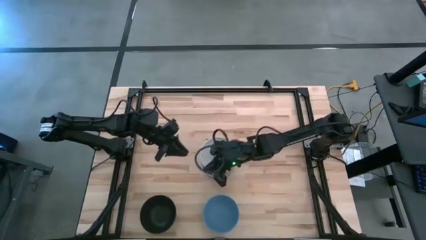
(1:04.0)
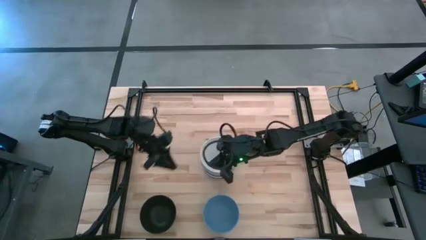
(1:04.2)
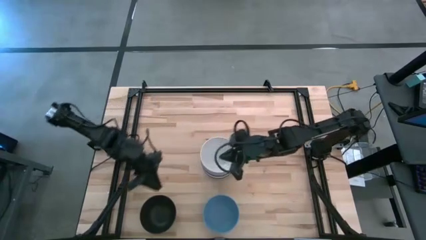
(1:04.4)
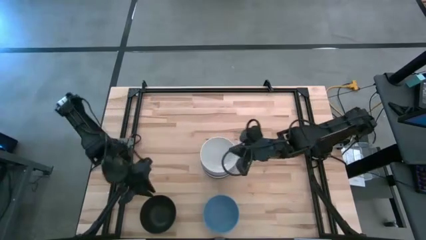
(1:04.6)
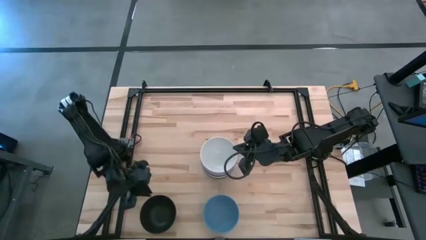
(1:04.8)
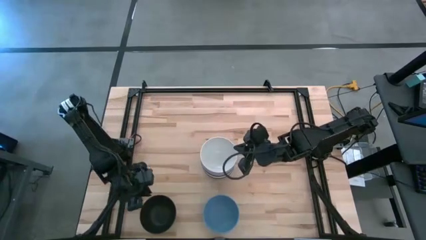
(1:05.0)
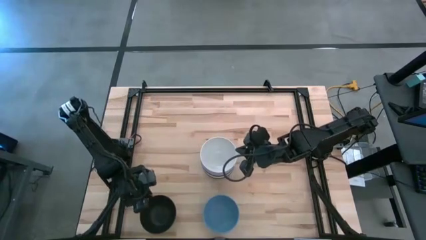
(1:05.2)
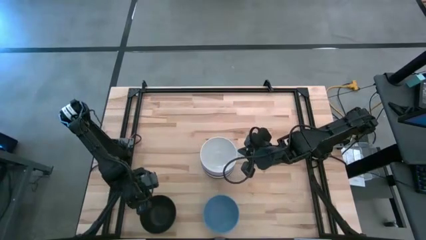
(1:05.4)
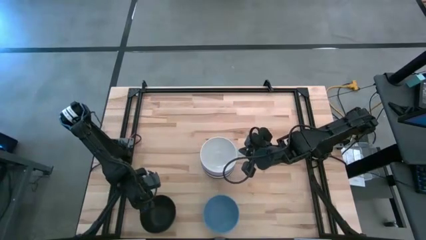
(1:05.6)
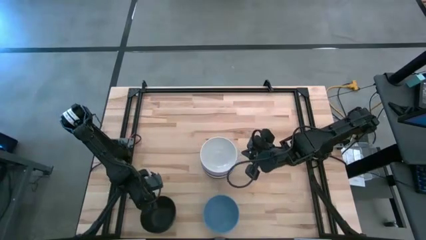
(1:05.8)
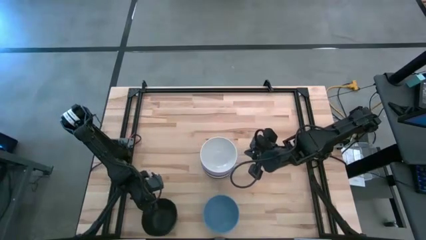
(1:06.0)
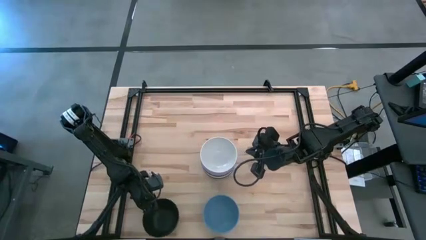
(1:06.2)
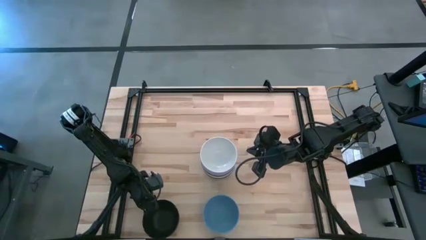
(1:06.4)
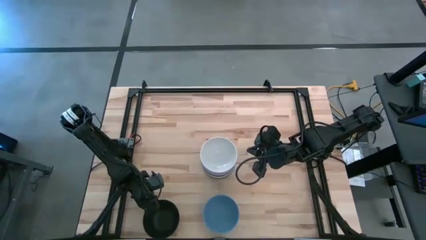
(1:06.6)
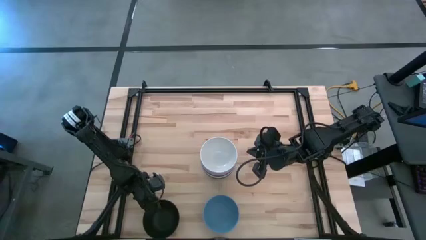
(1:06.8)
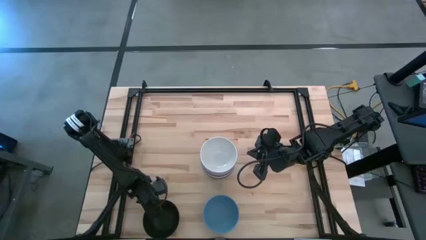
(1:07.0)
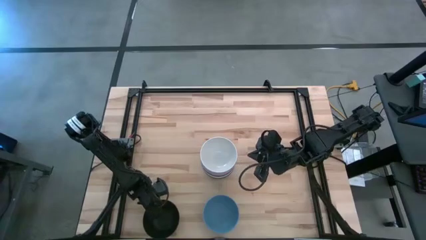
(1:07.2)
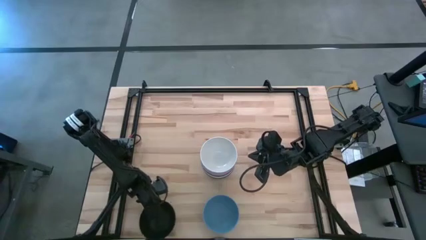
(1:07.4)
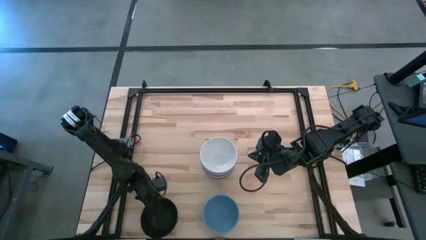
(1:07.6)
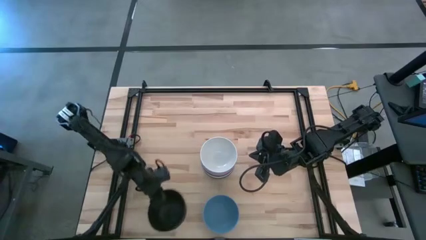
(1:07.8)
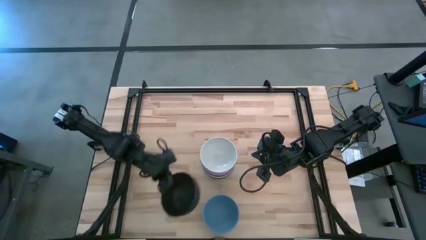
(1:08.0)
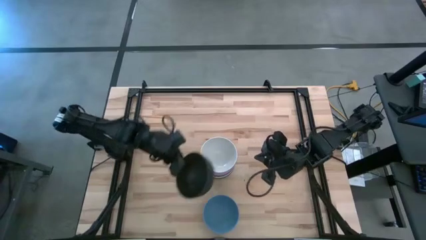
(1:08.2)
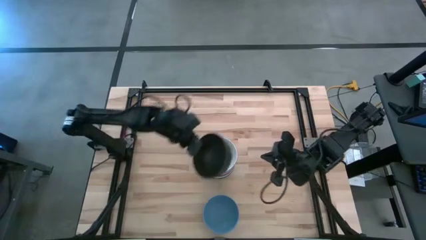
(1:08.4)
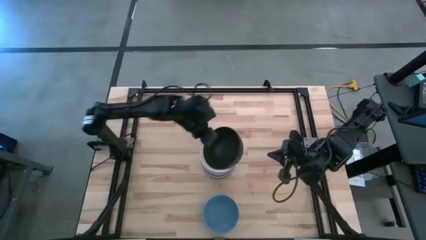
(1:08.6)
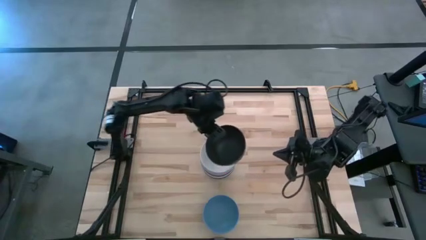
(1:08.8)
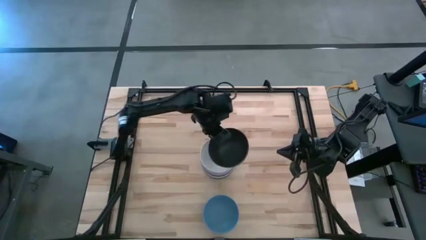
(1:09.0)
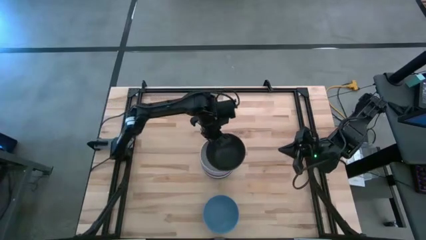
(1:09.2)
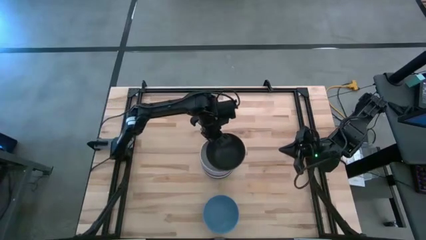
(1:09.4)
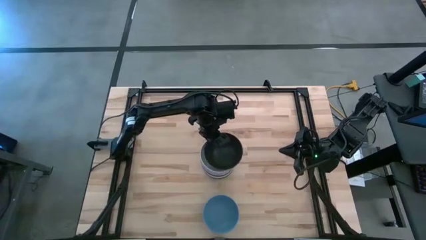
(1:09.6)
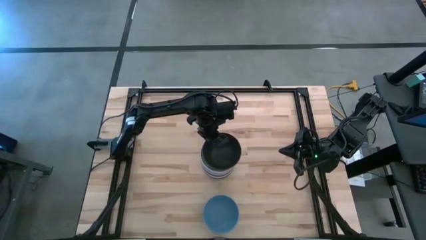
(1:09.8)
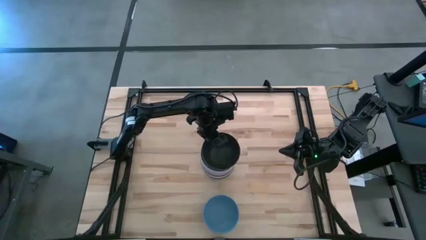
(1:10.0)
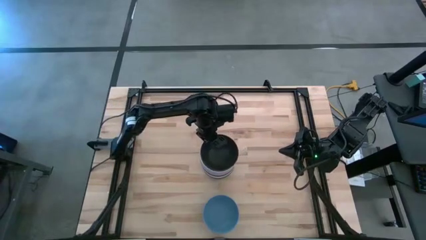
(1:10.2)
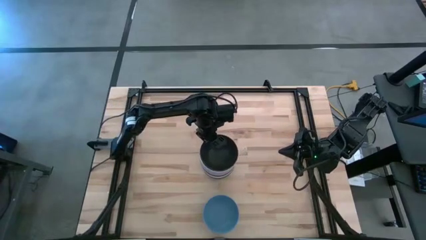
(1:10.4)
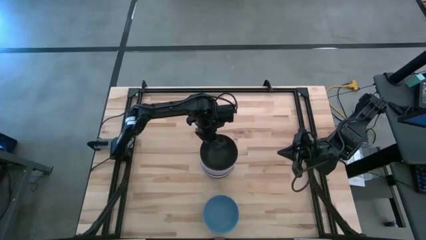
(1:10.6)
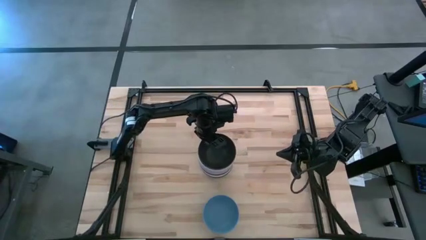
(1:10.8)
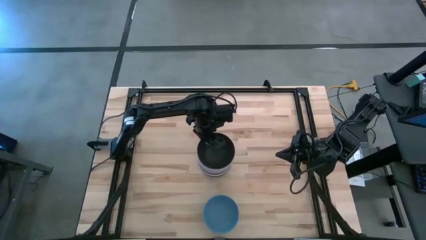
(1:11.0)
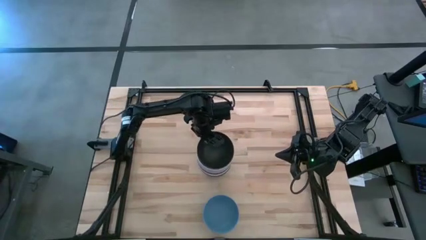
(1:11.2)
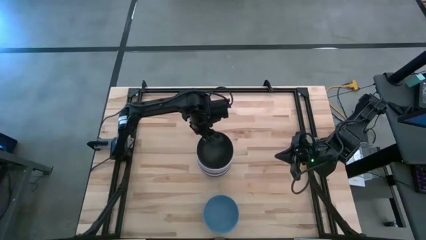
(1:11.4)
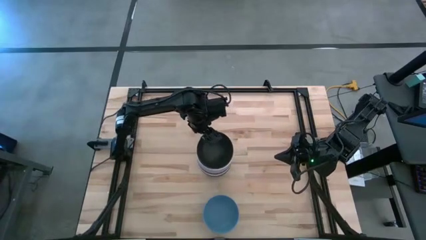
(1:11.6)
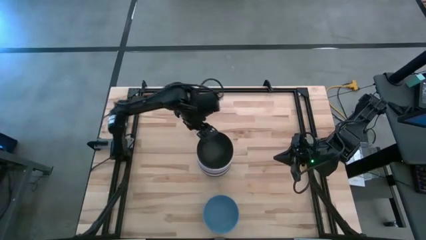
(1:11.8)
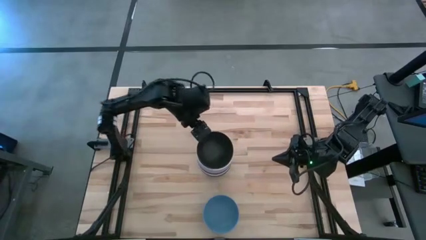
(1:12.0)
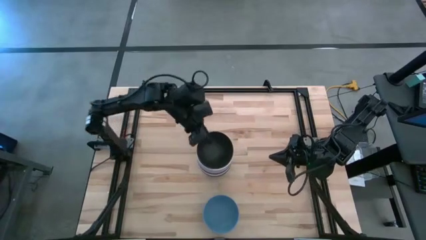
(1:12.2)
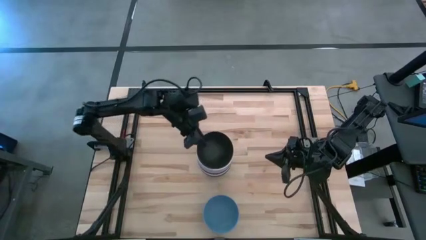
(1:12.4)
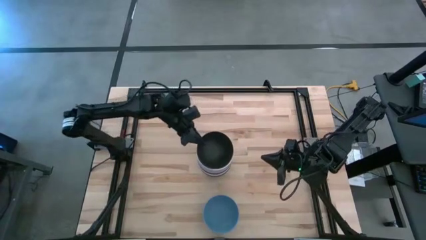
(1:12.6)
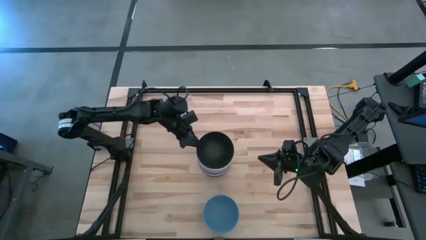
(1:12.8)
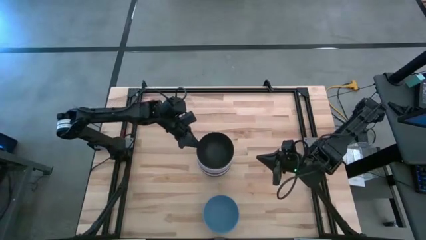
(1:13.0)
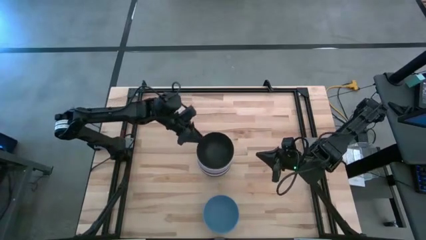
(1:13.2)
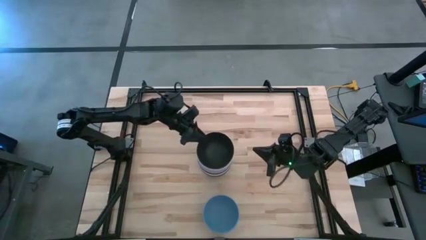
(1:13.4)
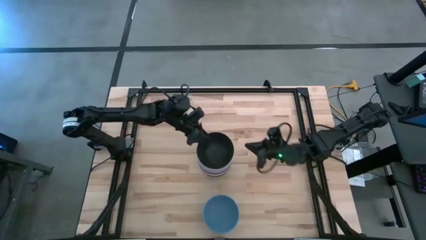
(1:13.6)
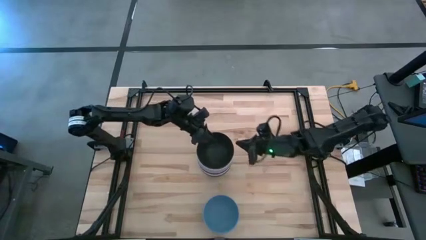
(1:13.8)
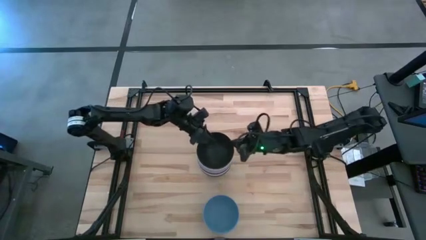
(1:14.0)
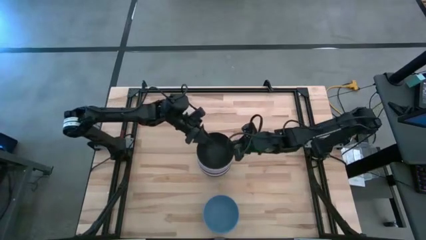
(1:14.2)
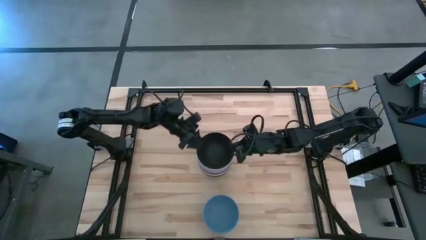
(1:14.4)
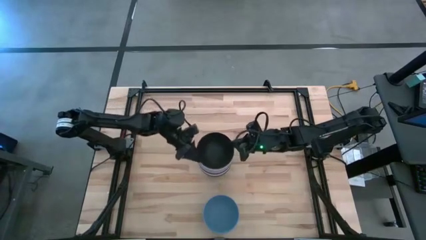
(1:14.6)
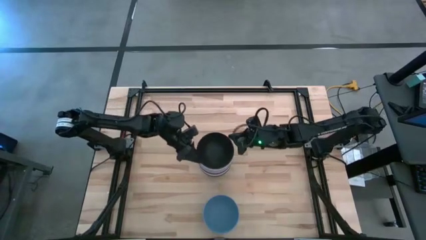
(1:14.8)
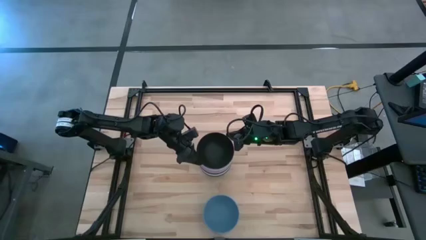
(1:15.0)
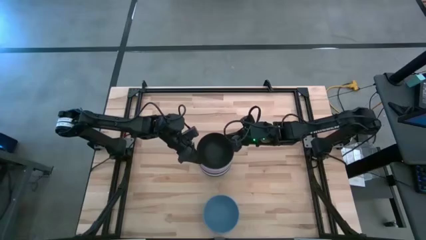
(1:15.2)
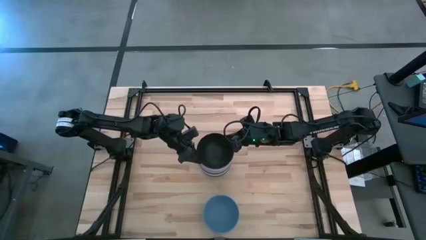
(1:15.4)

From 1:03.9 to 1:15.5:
Task: Nest bowls inside each other
Stack the black bowl into the white bowl

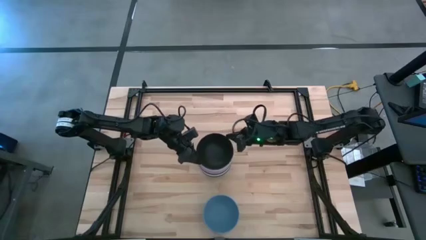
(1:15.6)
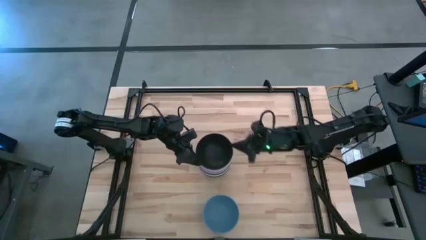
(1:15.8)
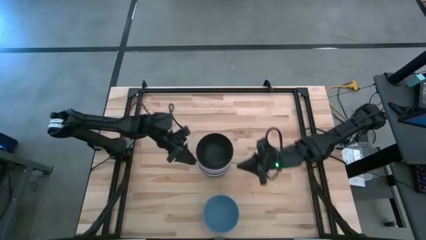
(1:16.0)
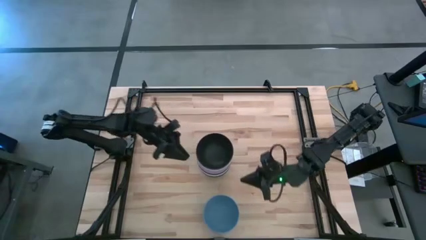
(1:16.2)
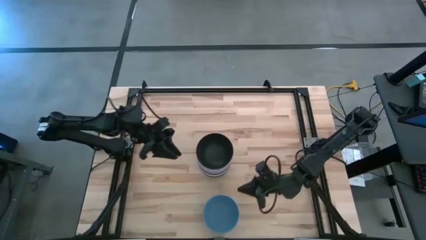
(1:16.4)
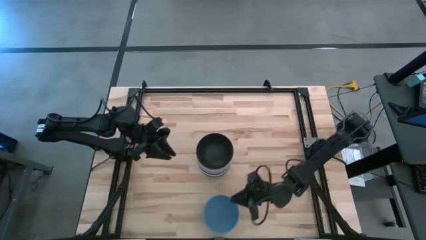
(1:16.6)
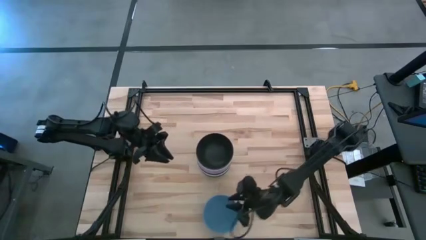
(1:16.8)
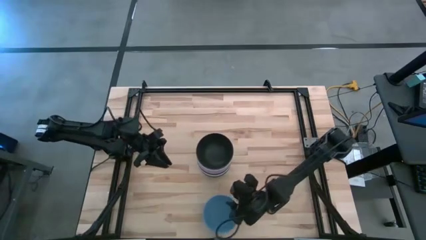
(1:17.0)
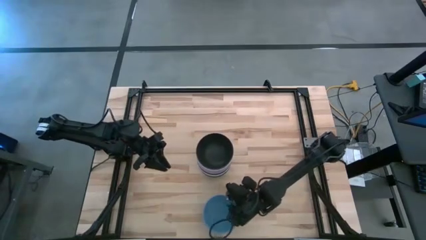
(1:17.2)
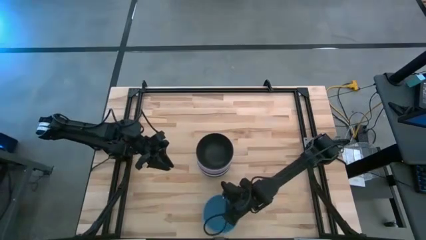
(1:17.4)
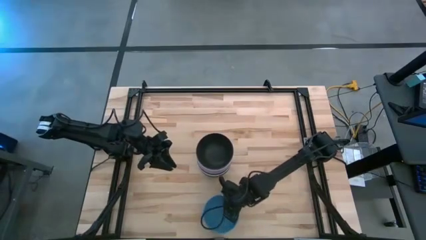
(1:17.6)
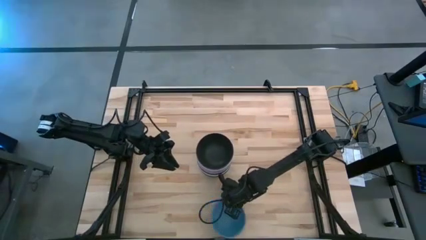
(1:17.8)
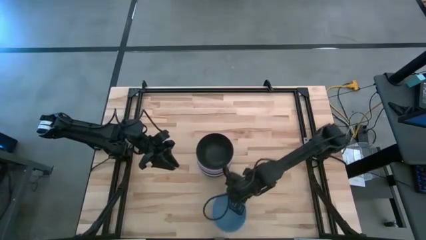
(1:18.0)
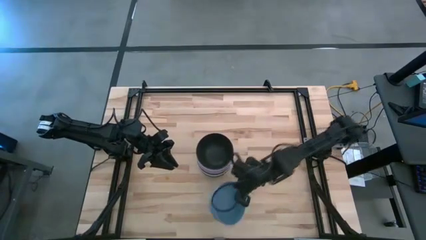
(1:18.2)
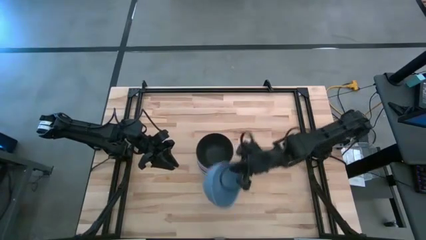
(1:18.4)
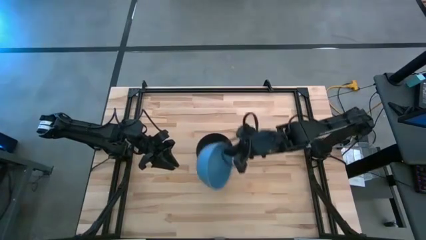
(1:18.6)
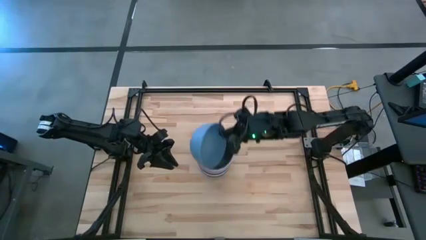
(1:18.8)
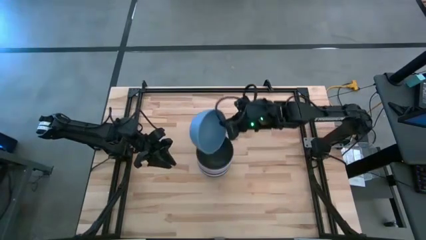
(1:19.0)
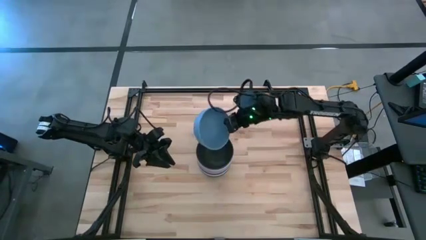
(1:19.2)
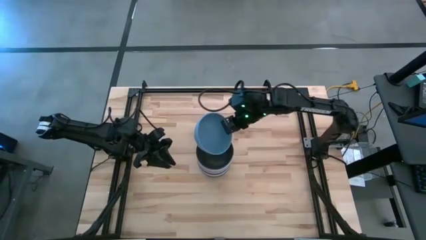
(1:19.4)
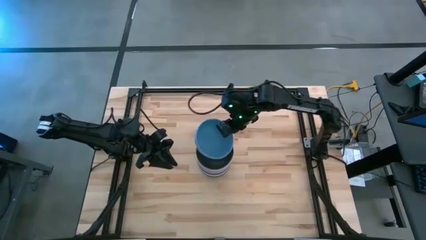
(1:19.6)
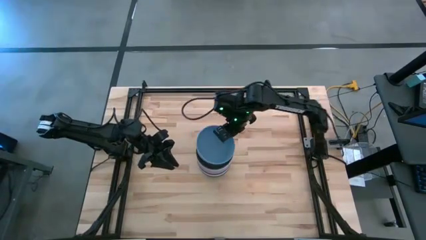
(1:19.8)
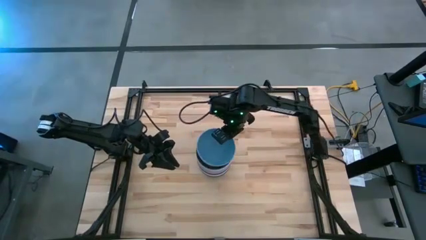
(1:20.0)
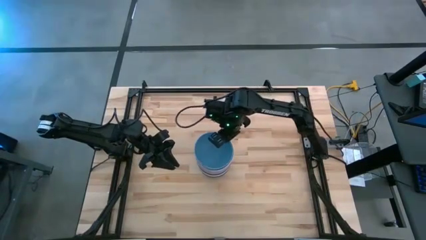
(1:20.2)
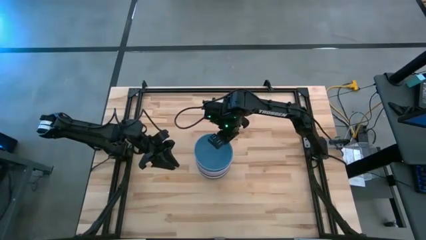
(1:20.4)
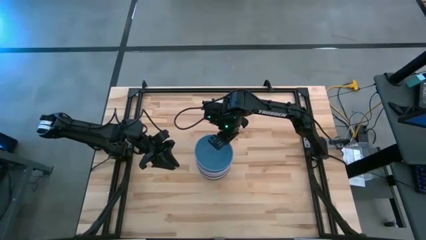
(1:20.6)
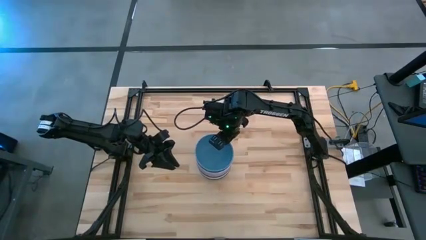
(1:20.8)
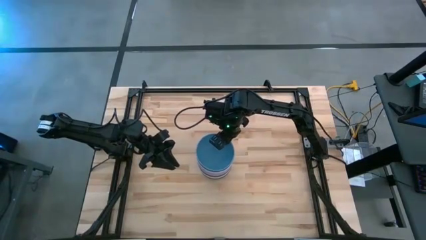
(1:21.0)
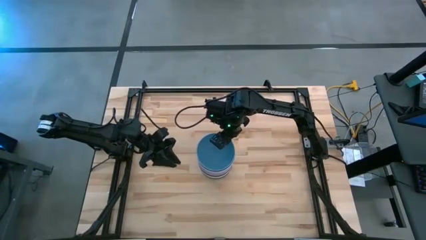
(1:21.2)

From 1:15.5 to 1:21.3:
Stack the blue bowl into the black bowl
